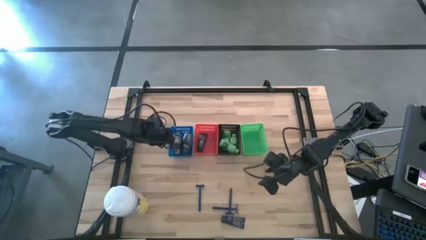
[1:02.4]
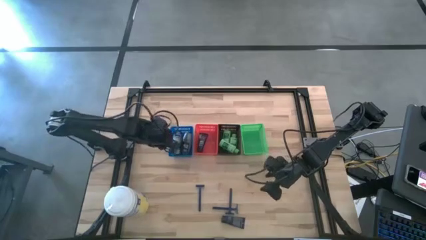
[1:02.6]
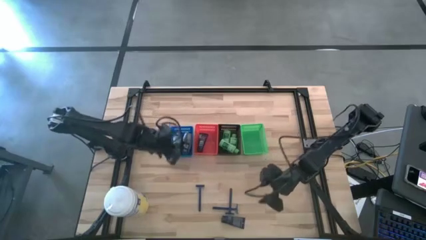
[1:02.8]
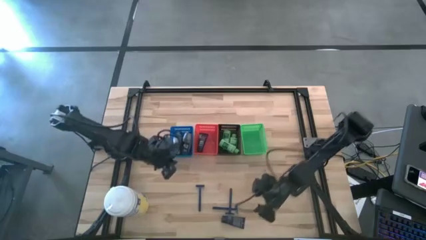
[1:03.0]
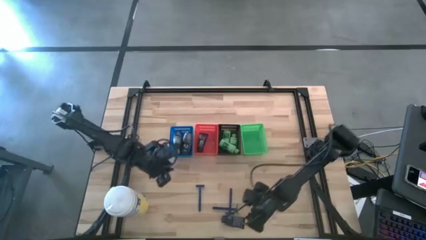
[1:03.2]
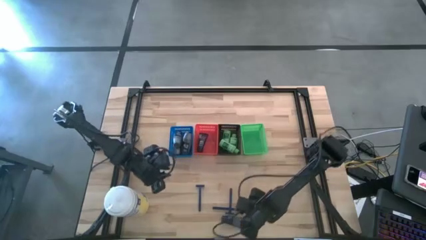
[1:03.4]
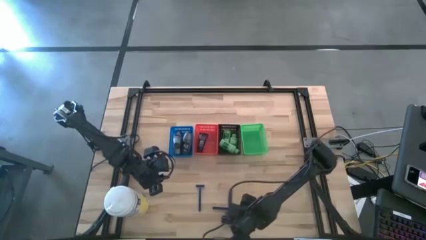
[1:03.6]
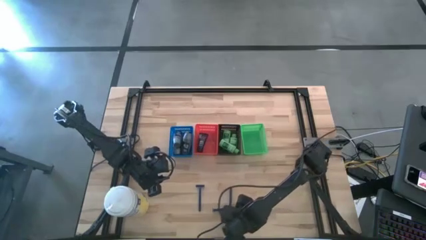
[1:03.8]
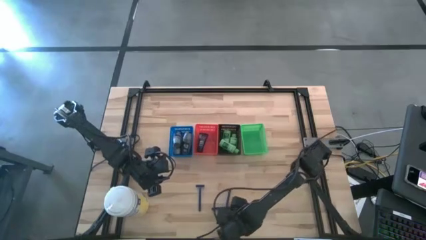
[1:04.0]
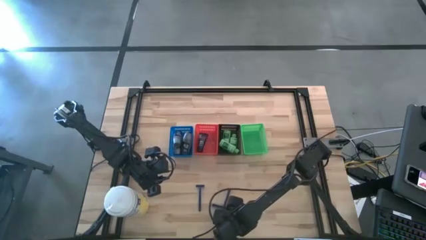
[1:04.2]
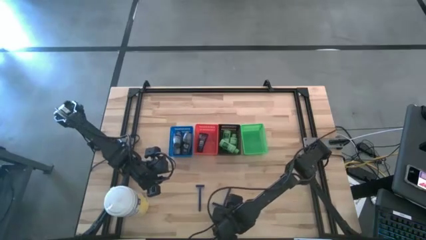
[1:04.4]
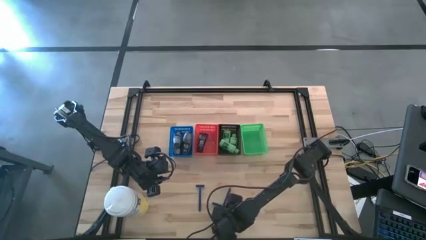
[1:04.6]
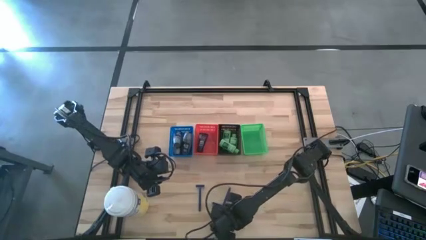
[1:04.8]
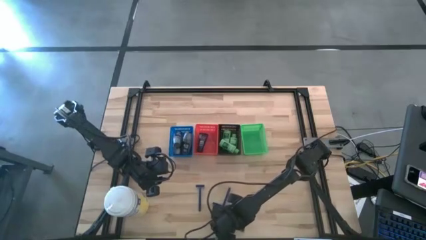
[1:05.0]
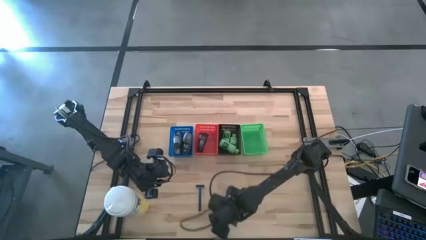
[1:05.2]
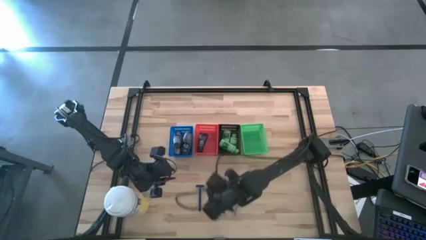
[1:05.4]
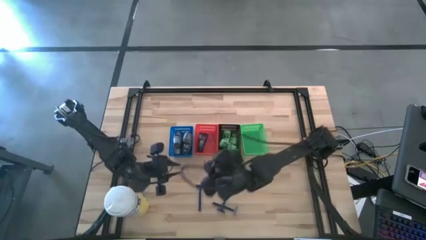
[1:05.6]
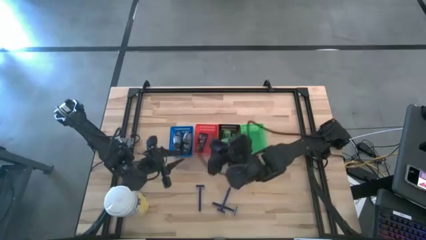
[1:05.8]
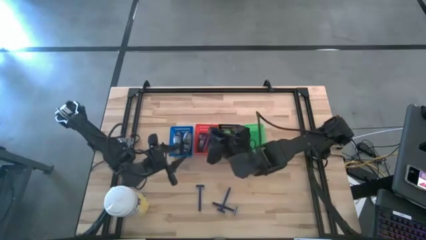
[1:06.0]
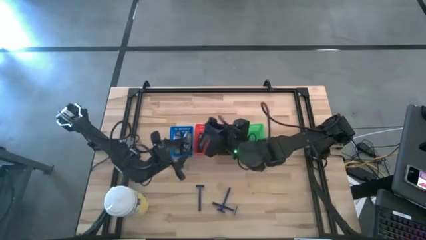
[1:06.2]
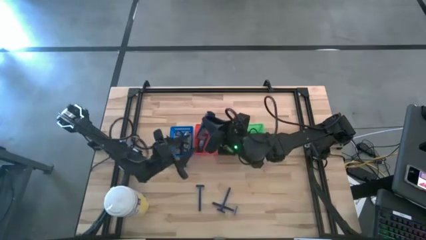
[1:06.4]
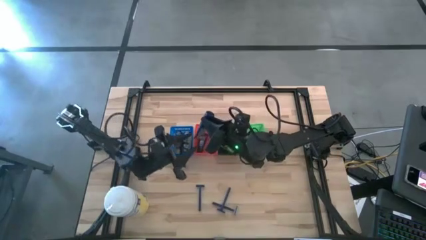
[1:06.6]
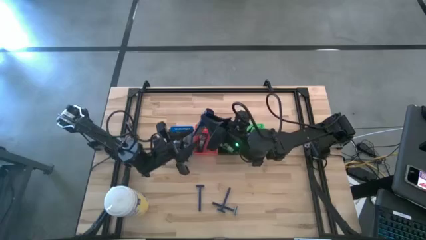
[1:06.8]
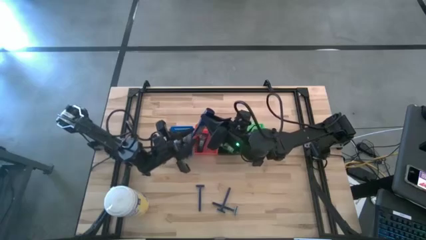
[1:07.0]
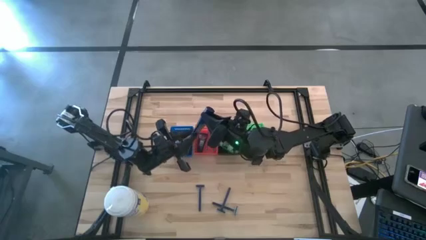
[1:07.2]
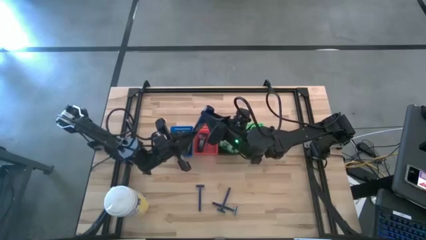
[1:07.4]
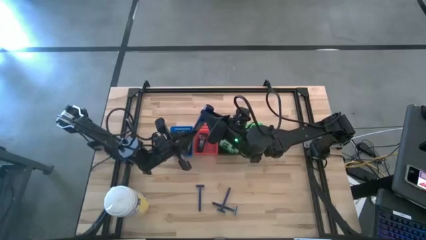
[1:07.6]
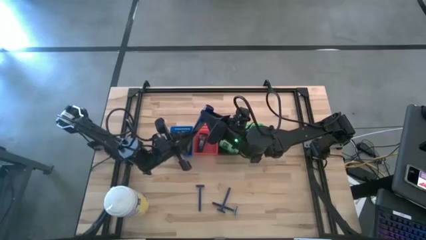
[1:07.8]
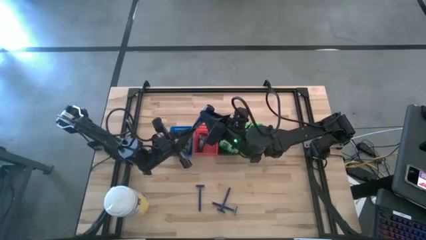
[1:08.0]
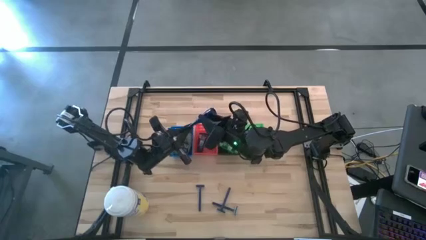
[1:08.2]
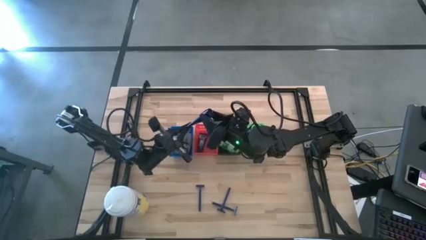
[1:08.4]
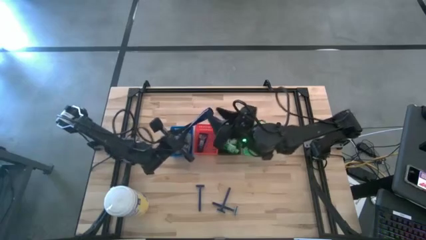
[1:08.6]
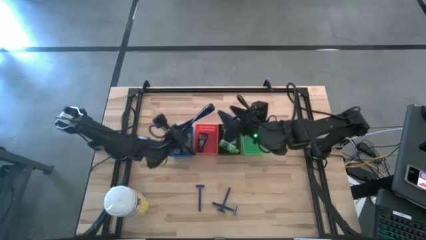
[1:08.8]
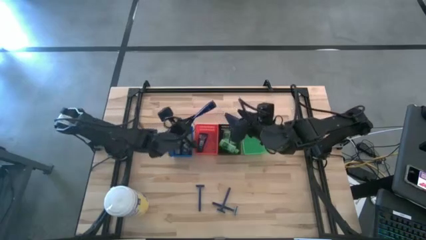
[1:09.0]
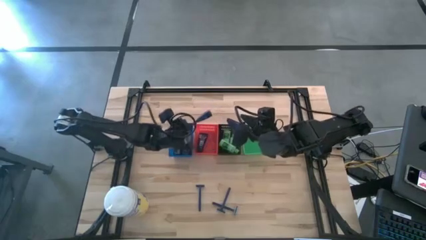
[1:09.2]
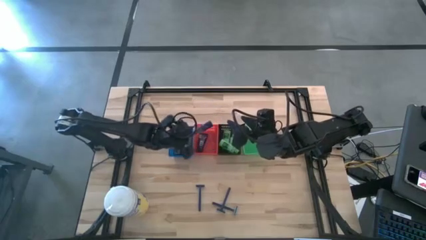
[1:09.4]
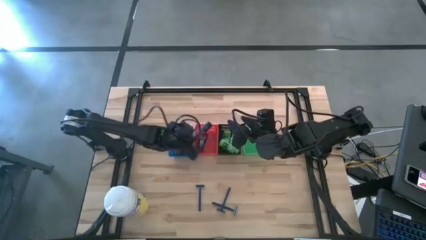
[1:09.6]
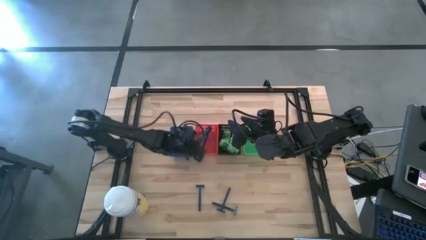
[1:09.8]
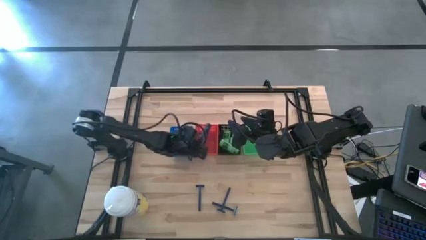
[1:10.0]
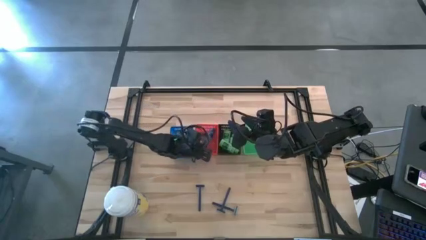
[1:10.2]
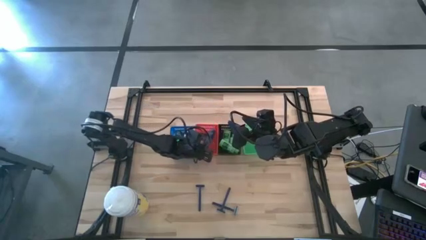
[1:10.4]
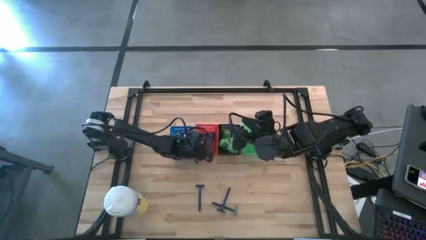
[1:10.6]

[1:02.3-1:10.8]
Task: Pick & Place Travel size toiletries
Put the shave cream into the red bin

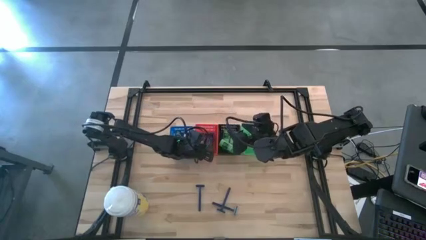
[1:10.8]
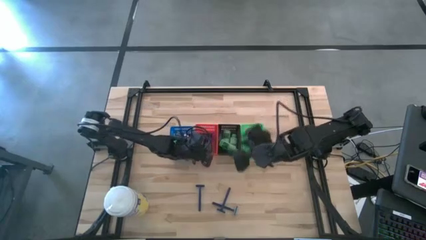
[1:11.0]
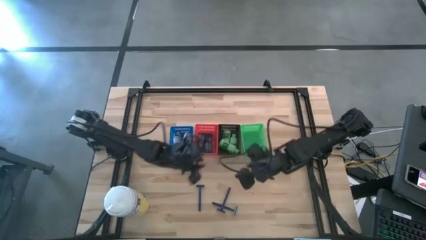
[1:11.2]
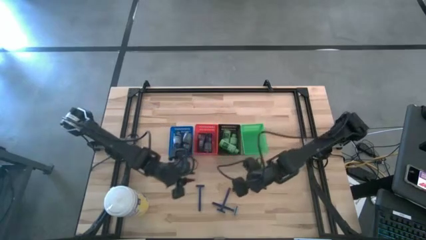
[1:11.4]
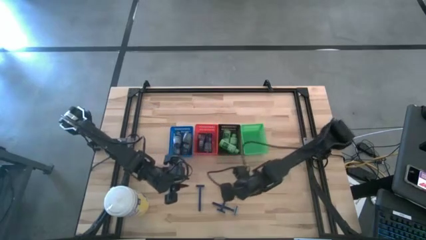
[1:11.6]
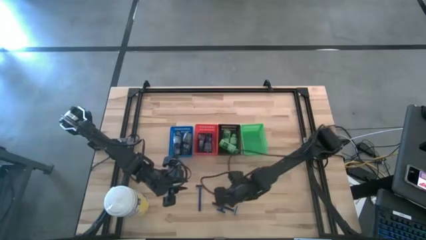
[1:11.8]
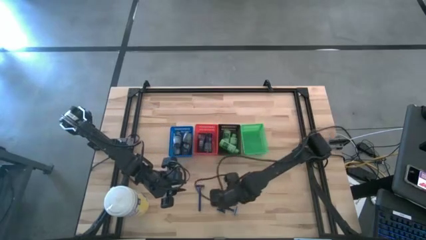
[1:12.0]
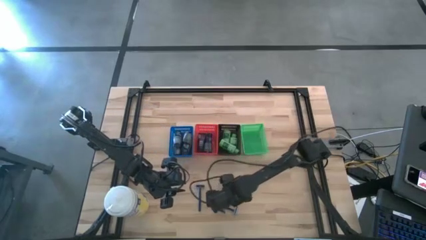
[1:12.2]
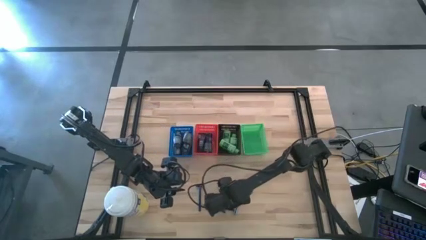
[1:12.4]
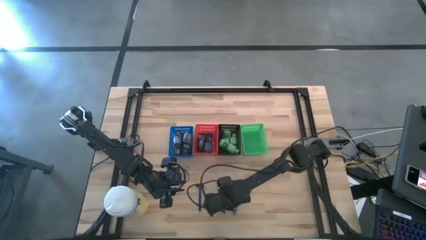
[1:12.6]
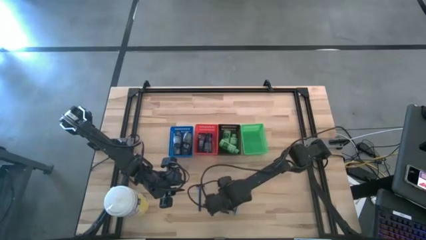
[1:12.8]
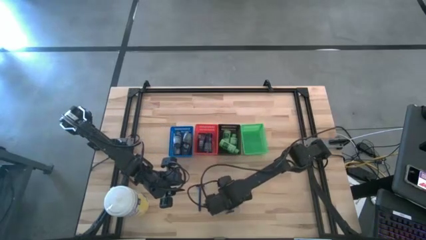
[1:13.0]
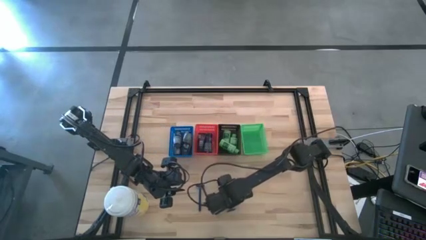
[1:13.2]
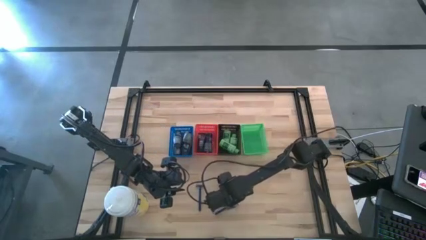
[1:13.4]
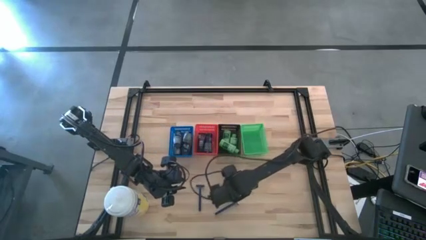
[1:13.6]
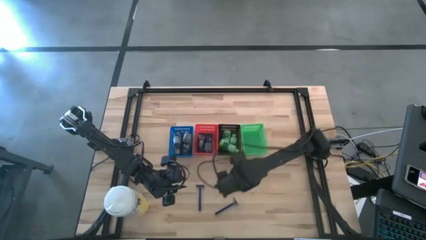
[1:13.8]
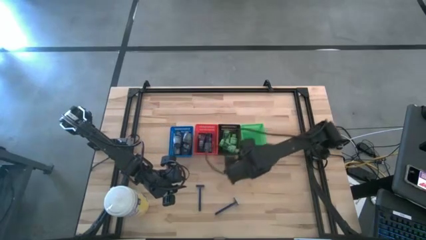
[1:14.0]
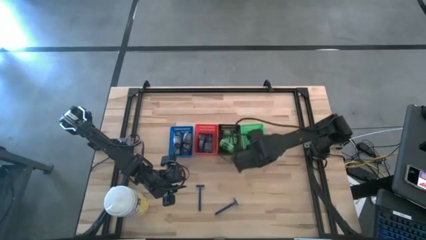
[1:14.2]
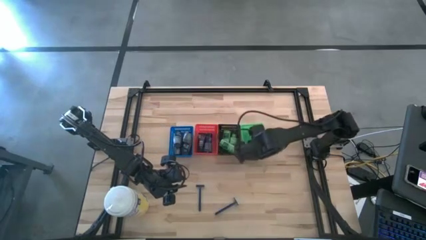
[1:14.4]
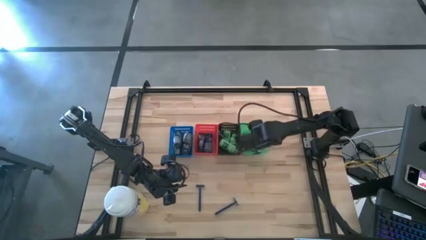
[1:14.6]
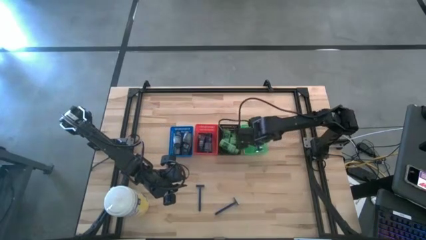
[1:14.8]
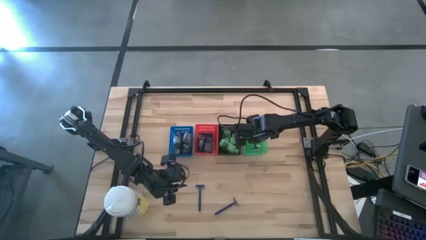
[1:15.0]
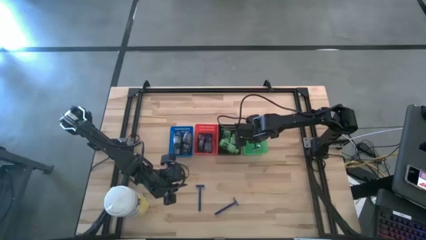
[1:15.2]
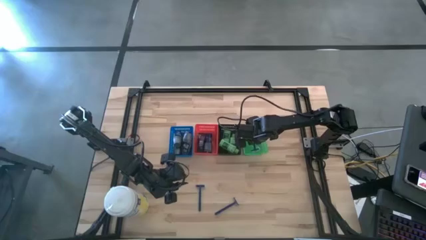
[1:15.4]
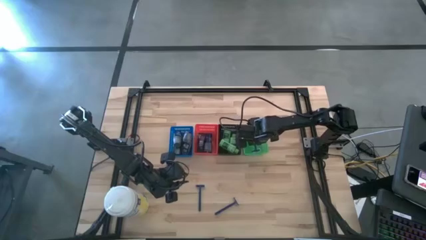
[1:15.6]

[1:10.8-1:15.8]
Put the razor into the green bin

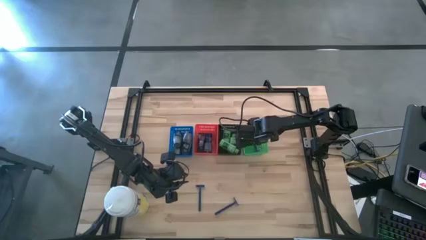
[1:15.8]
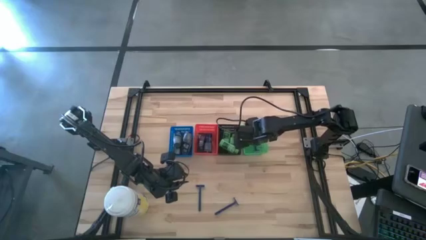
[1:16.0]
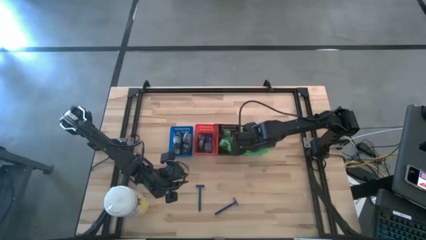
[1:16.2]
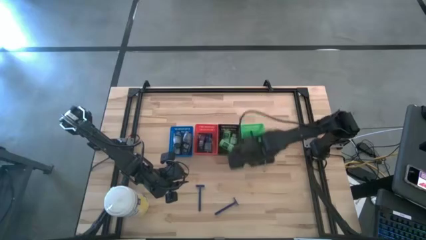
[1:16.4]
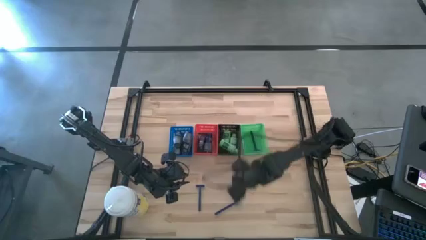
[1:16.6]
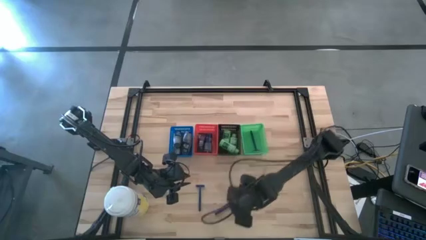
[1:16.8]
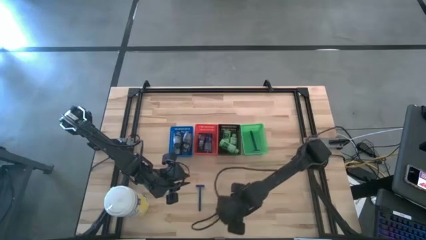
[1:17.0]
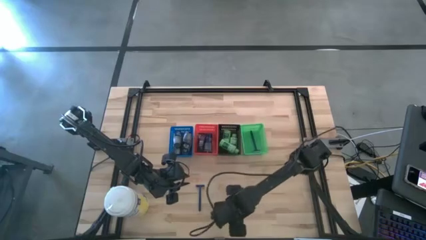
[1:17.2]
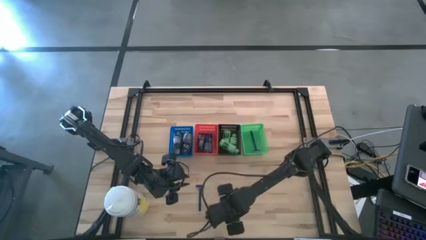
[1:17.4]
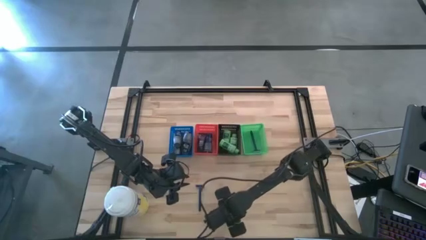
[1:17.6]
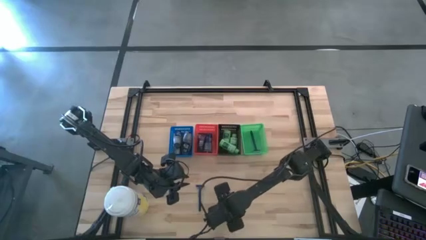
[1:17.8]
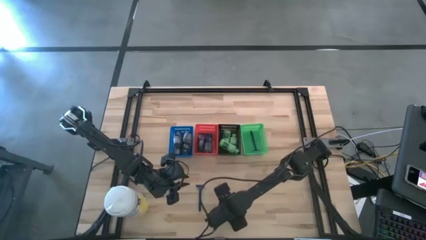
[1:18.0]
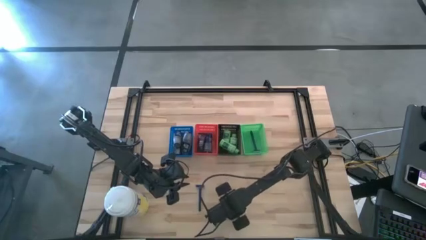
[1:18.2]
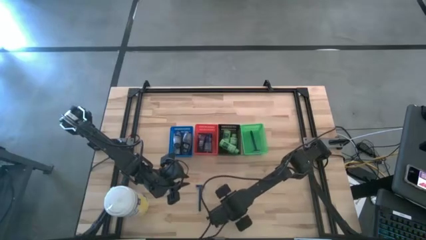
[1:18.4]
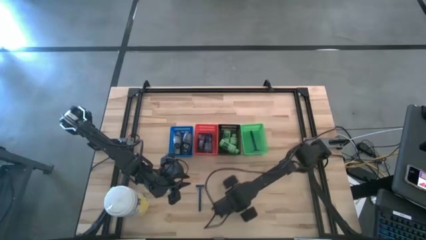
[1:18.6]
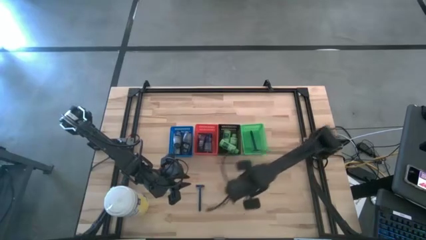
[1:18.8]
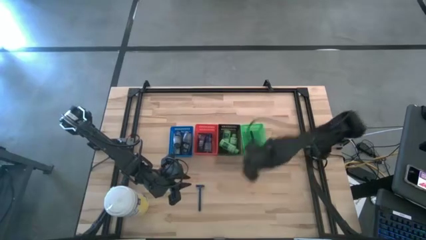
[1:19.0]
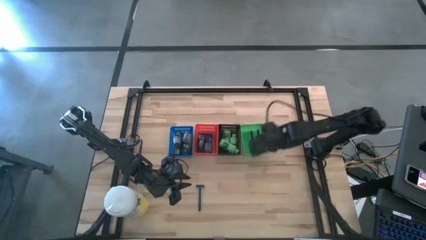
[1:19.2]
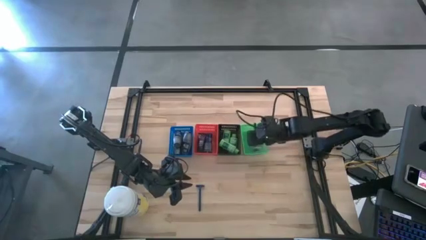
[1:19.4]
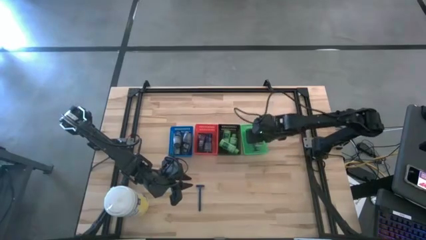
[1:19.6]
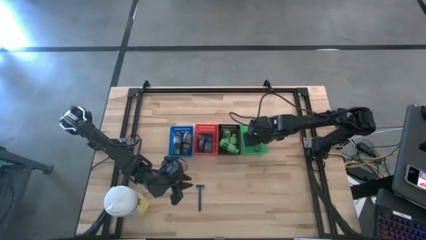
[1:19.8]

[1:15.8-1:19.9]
Put the razor into the green bin
